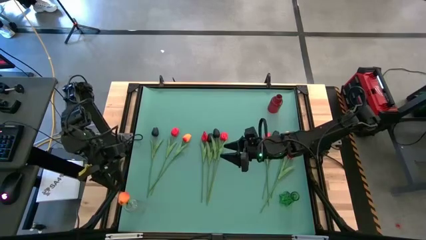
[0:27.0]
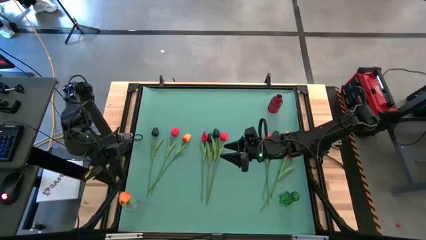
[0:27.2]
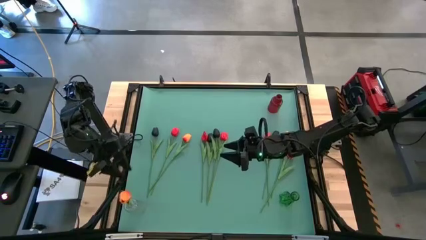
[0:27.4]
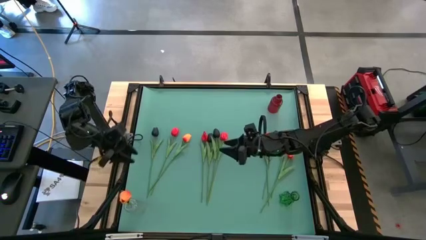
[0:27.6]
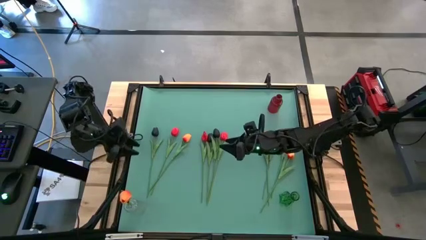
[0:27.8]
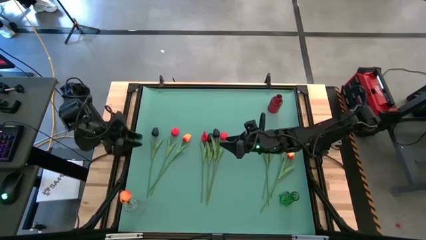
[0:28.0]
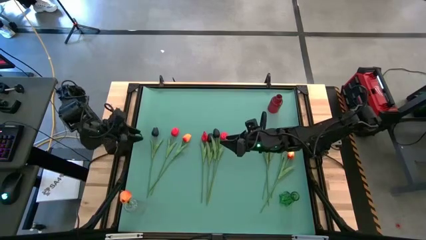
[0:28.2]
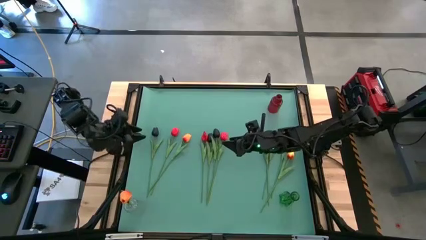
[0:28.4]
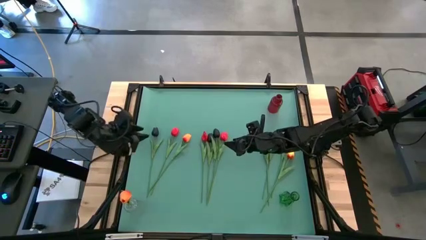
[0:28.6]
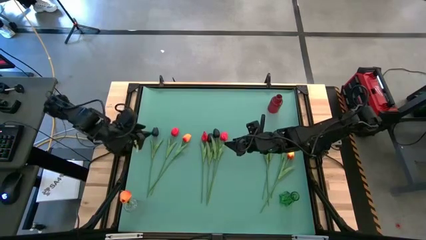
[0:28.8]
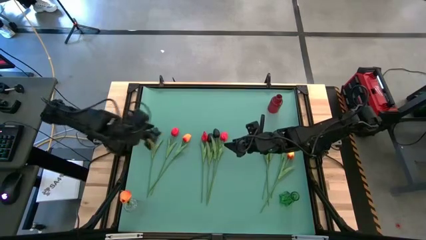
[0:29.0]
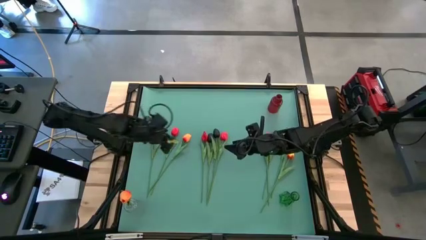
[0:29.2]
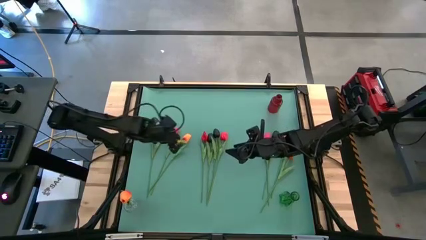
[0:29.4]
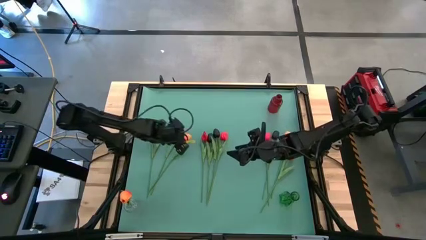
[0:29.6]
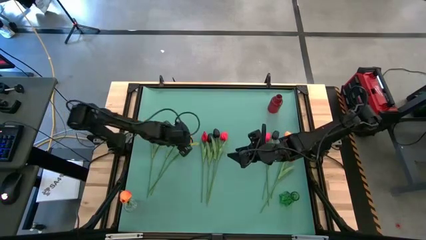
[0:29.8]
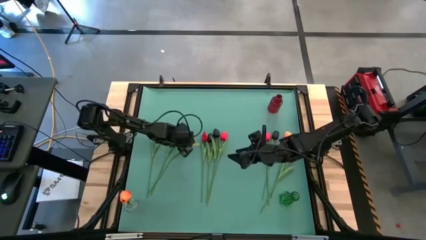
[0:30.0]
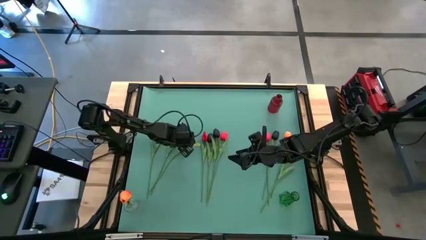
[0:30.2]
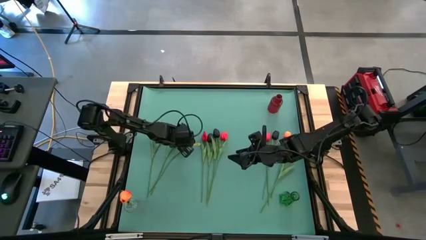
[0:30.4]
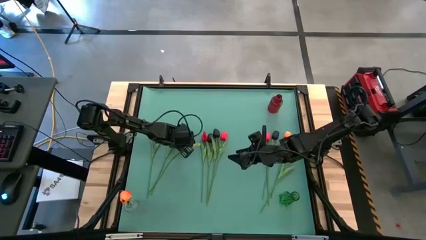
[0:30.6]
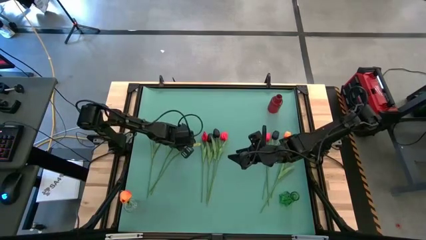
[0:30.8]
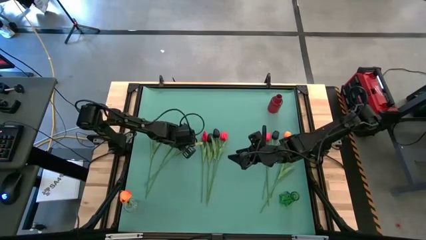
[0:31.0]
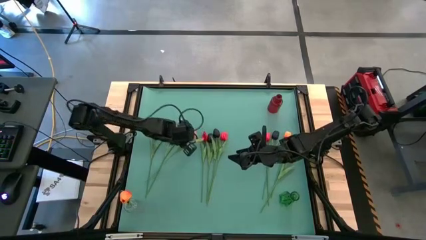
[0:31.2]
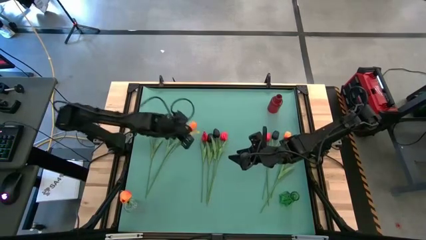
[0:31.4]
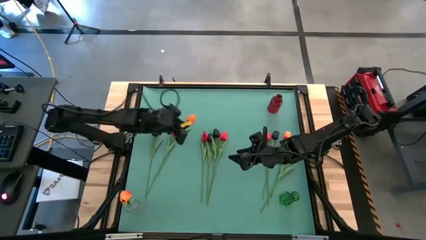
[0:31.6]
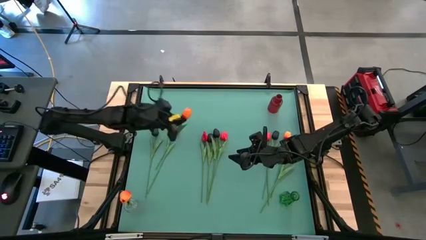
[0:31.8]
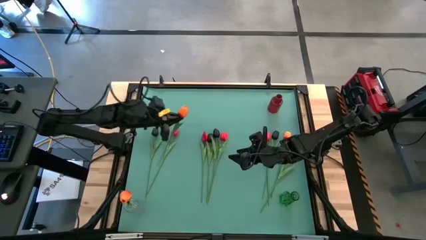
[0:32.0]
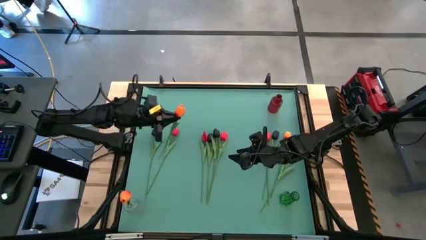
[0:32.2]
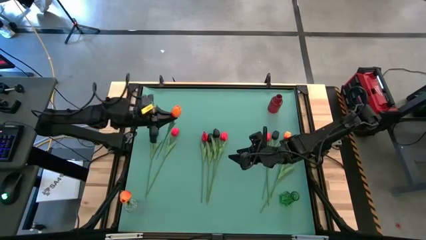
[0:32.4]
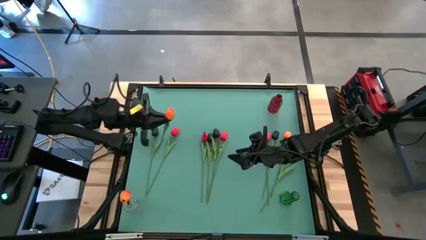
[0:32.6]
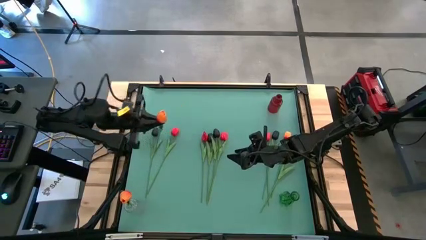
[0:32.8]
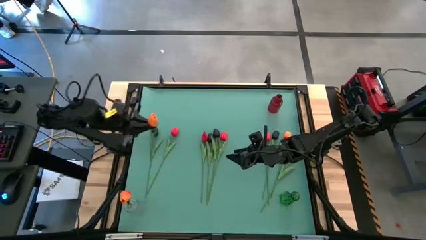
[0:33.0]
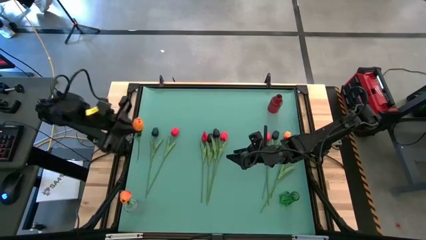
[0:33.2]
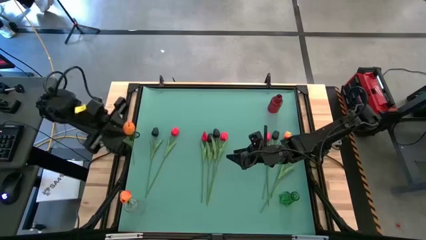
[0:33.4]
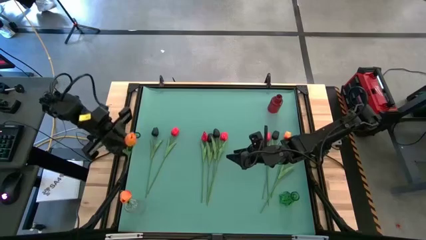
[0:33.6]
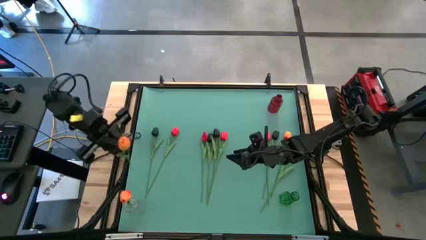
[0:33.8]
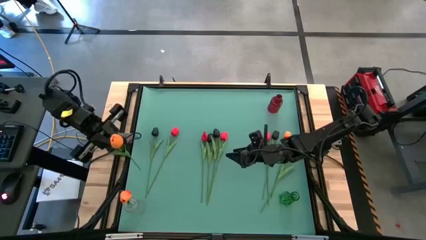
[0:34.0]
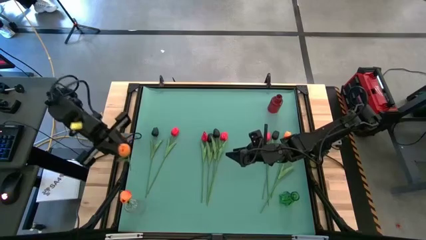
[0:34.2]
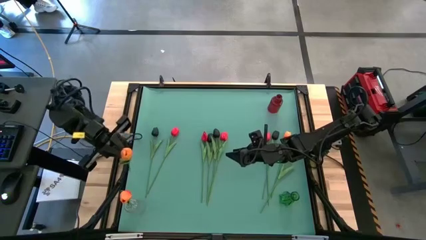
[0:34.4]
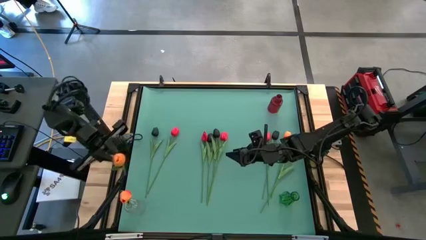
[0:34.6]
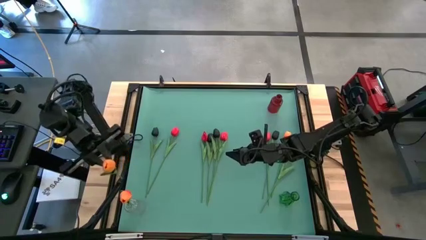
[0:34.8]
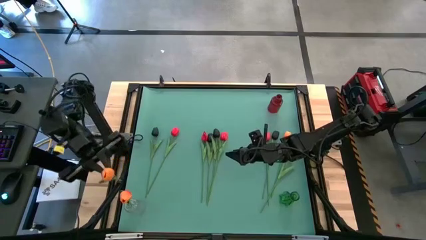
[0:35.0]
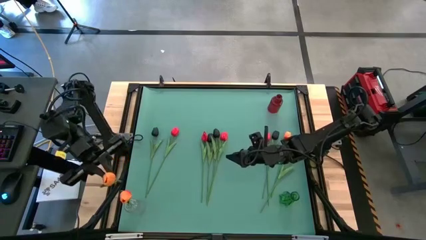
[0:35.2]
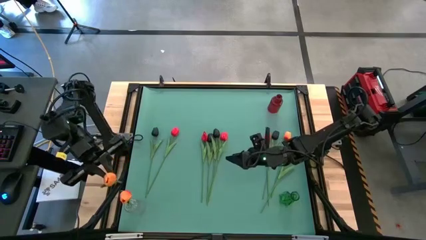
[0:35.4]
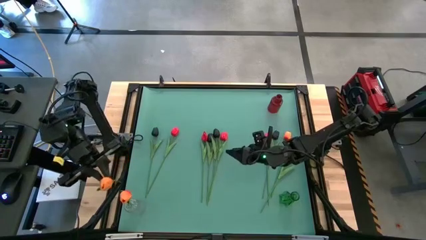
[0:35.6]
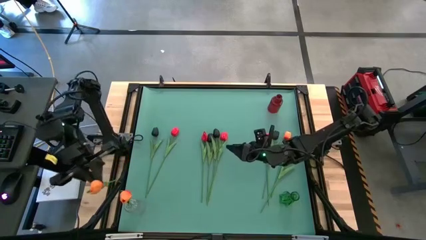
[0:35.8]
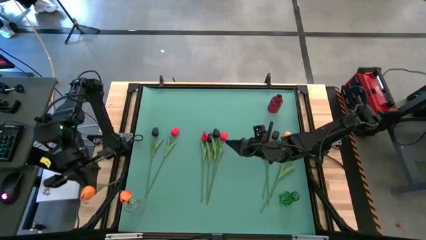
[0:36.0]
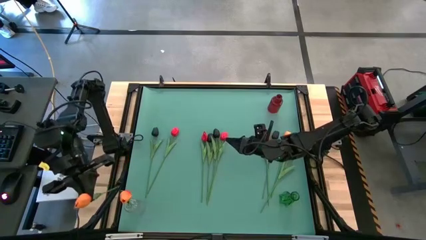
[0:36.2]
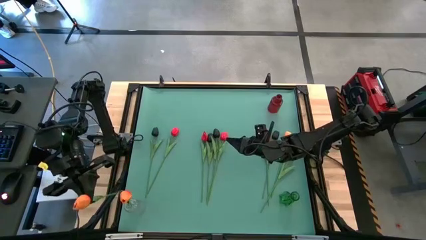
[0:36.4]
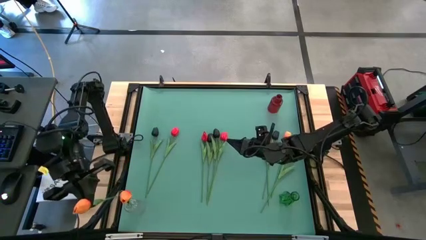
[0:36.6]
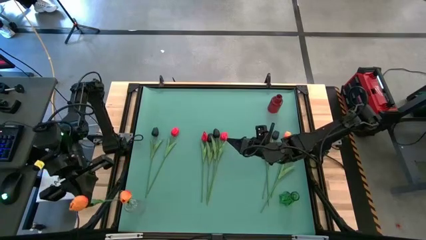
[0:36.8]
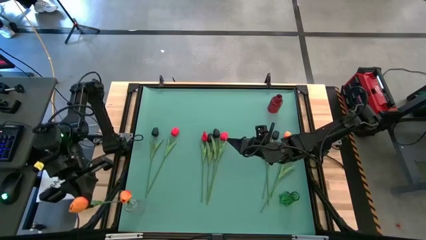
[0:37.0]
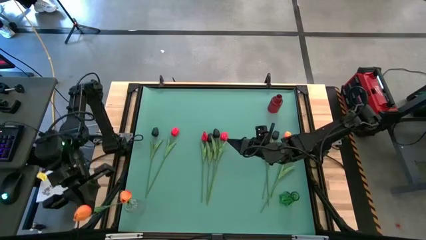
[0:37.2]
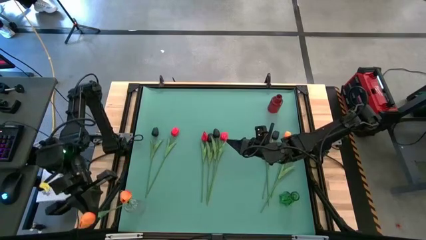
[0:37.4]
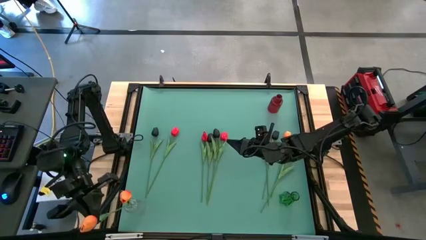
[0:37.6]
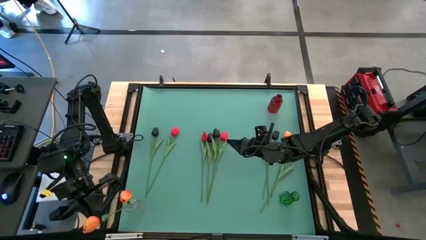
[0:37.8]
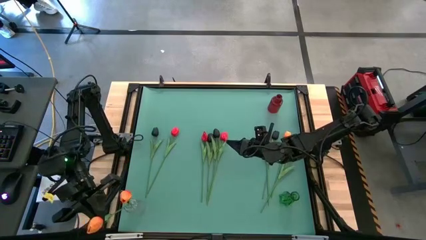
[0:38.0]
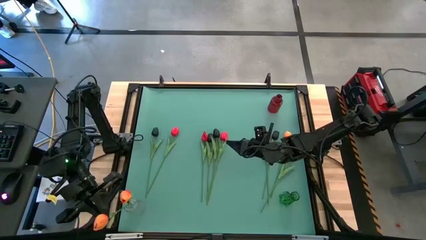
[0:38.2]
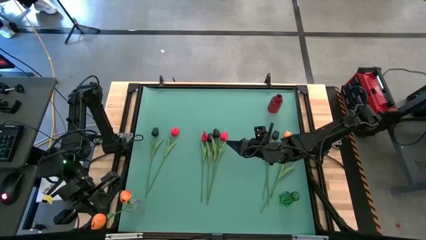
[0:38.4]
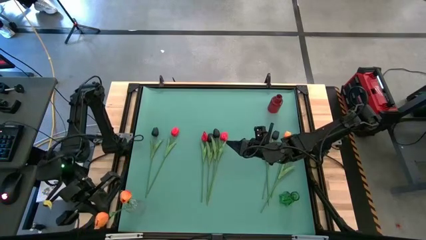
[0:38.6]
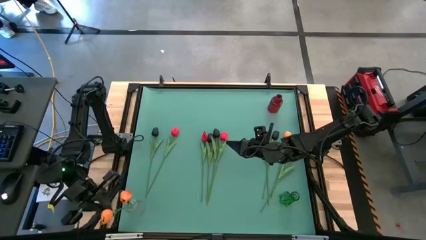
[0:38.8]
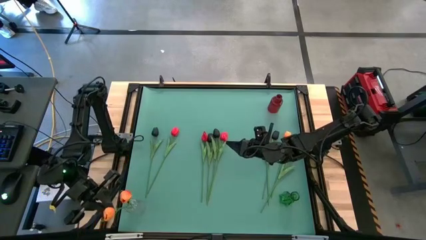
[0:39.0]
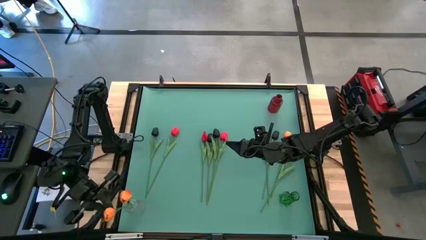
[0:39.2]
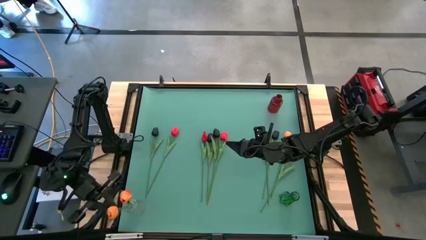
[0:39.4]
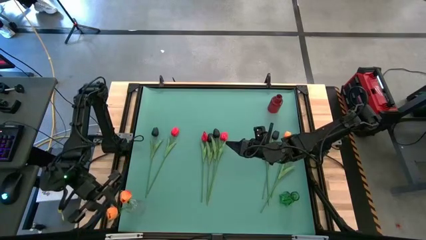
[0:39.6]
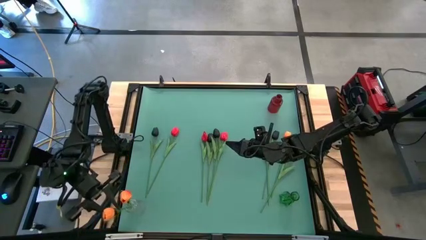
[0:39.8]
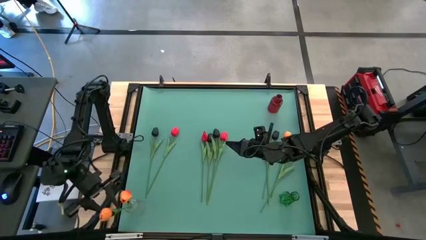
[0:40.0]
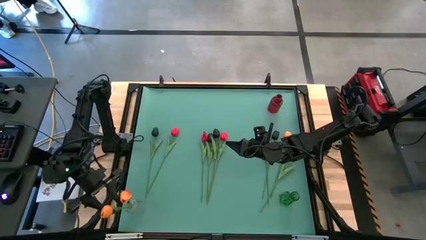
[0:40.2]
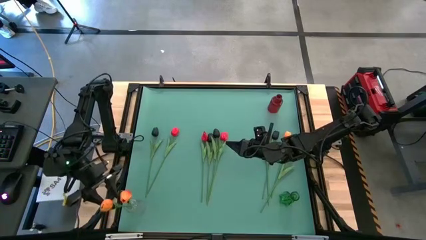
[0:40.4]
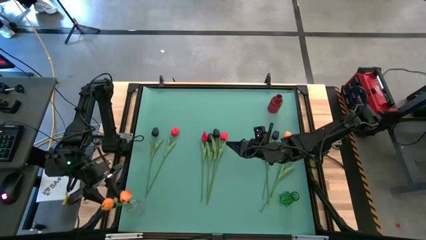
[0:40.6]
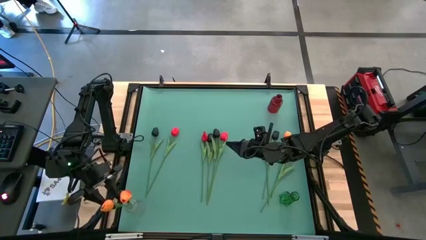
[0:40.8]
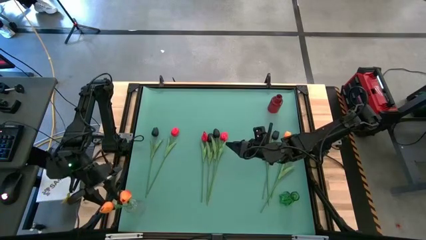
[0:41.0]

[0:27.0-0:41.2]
Task: Sort flowers into vase by color
Put the orange tulip into the transparent vase
